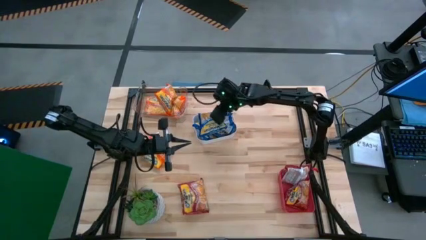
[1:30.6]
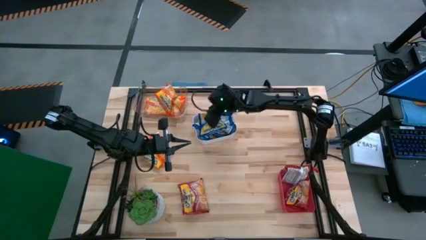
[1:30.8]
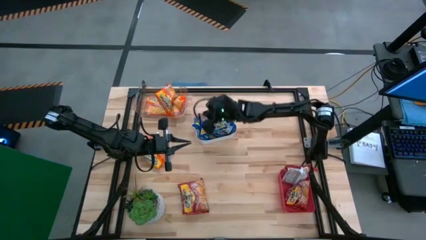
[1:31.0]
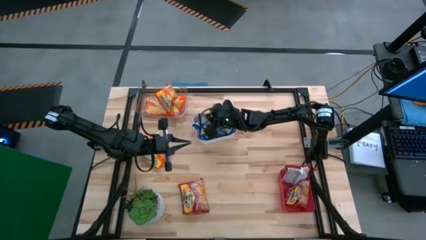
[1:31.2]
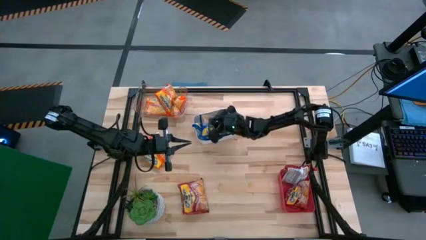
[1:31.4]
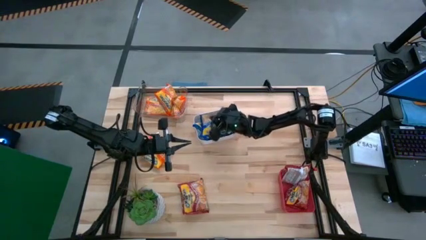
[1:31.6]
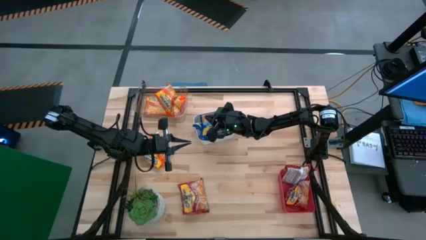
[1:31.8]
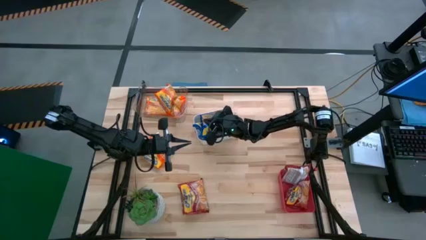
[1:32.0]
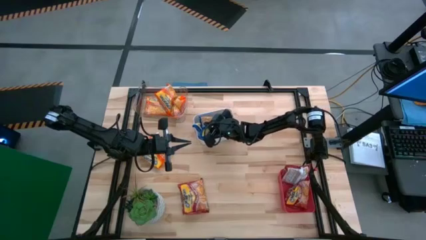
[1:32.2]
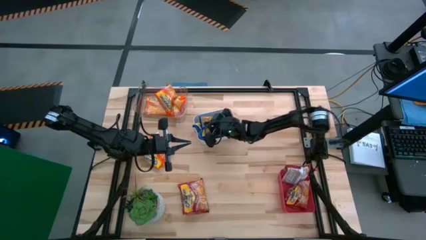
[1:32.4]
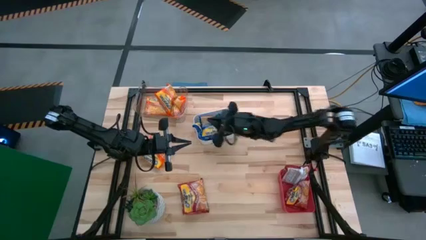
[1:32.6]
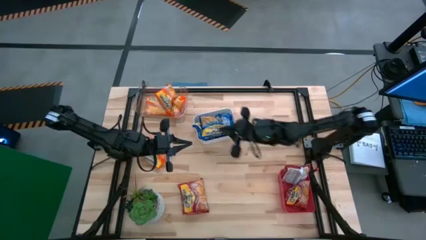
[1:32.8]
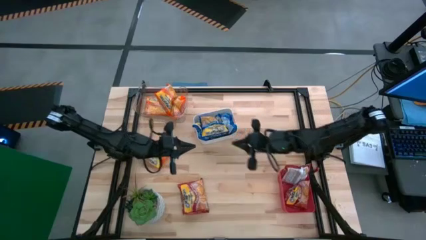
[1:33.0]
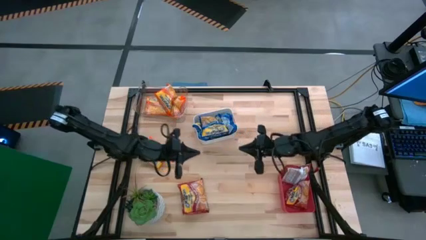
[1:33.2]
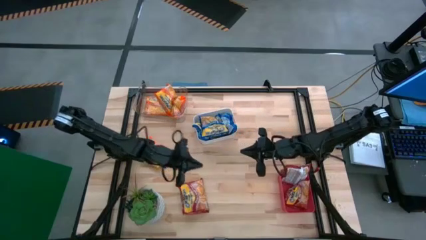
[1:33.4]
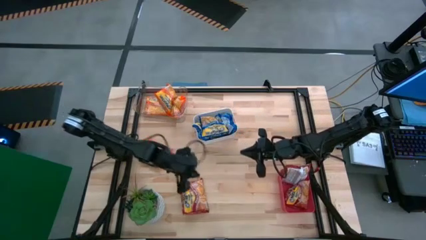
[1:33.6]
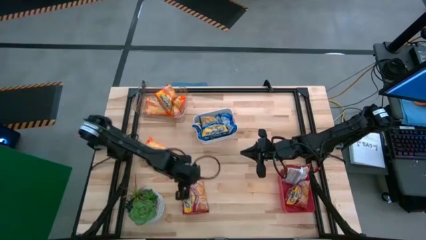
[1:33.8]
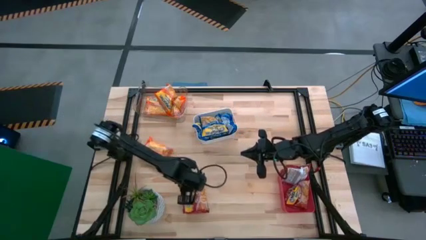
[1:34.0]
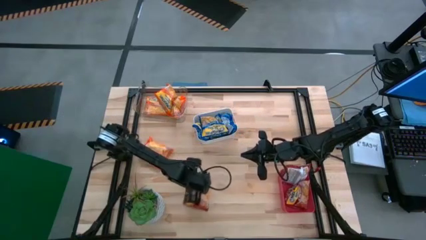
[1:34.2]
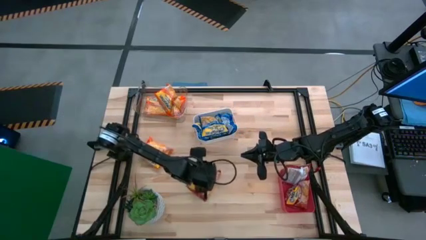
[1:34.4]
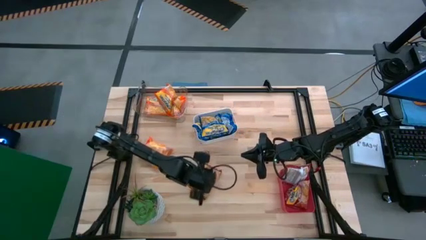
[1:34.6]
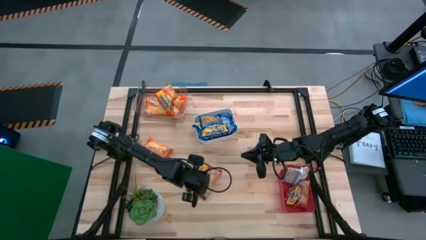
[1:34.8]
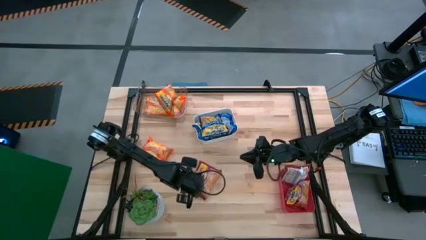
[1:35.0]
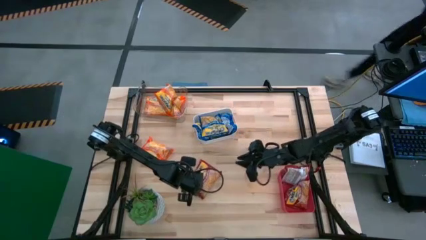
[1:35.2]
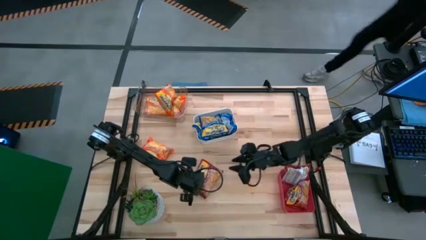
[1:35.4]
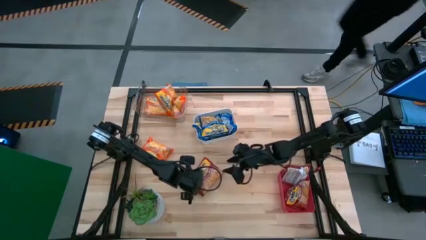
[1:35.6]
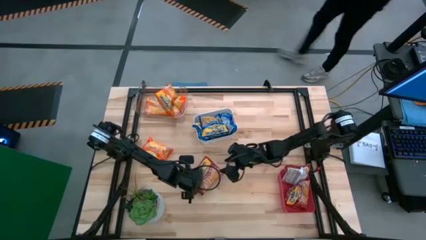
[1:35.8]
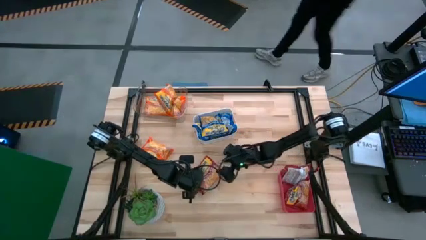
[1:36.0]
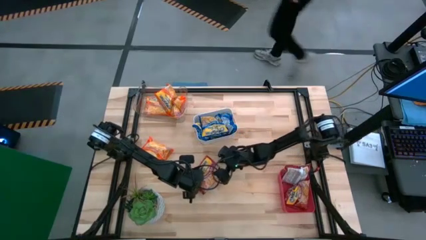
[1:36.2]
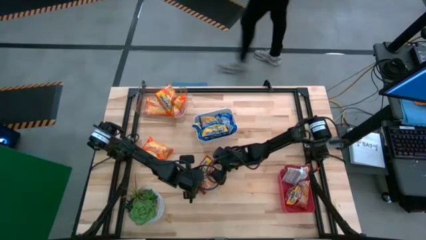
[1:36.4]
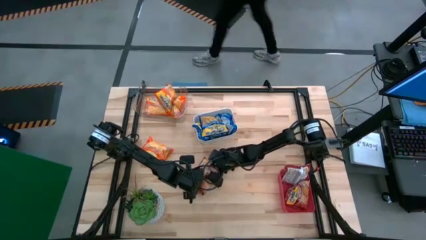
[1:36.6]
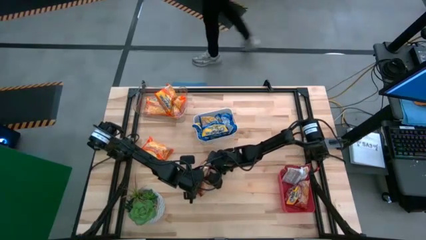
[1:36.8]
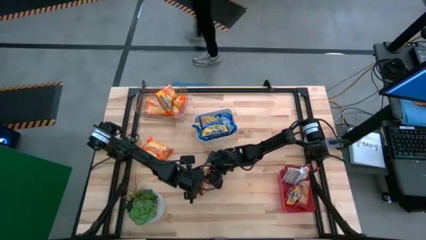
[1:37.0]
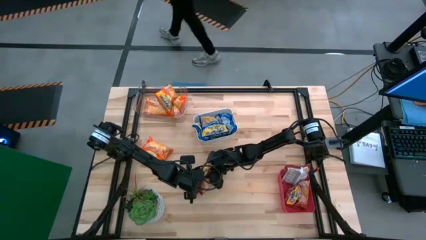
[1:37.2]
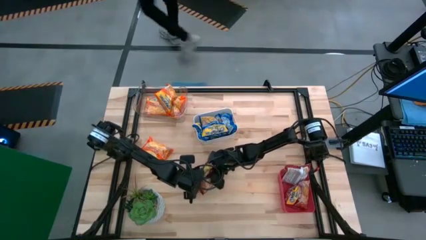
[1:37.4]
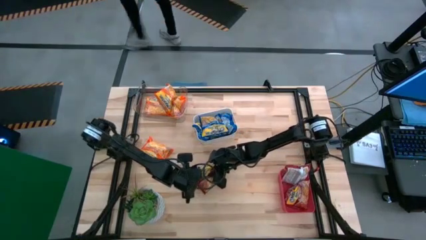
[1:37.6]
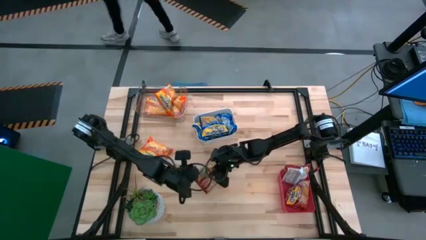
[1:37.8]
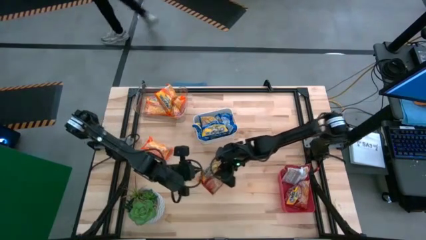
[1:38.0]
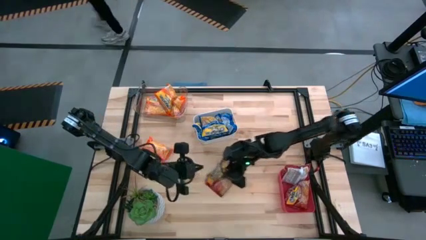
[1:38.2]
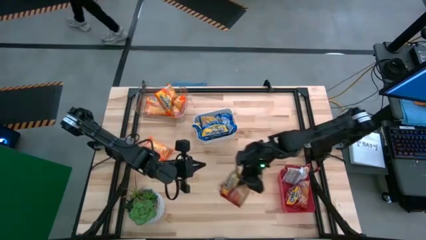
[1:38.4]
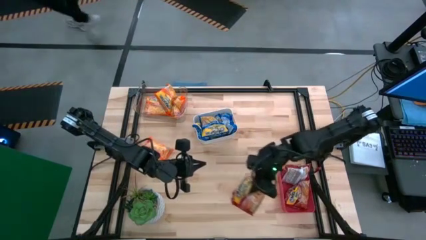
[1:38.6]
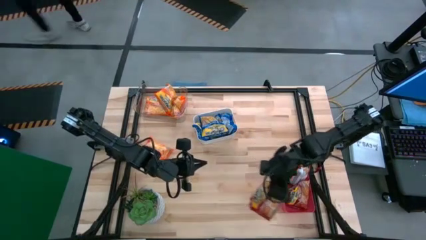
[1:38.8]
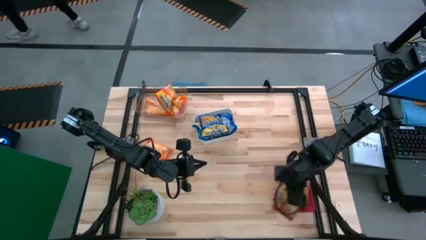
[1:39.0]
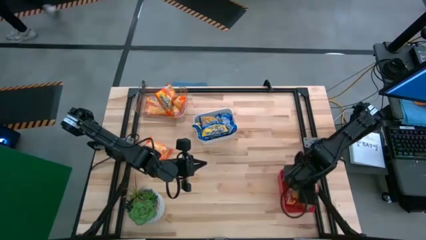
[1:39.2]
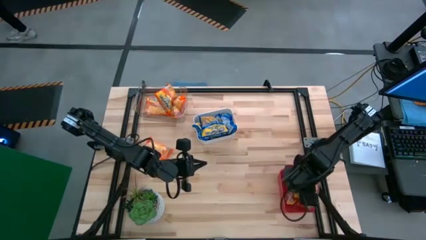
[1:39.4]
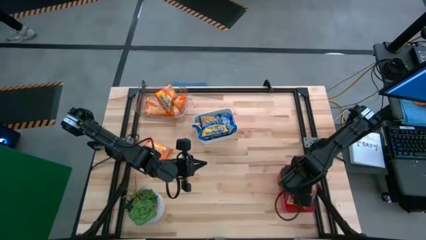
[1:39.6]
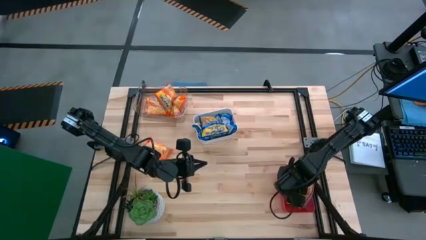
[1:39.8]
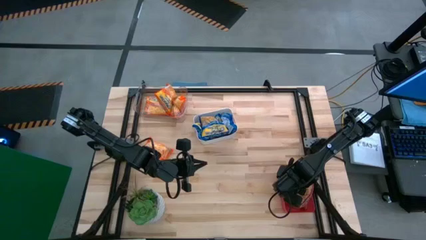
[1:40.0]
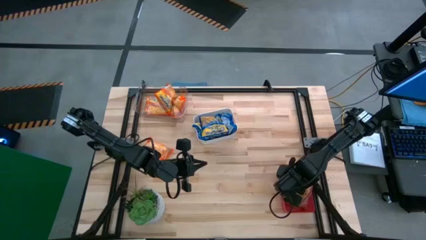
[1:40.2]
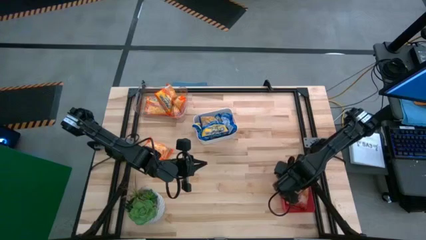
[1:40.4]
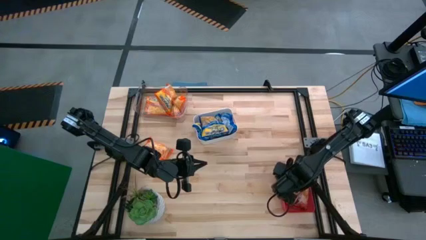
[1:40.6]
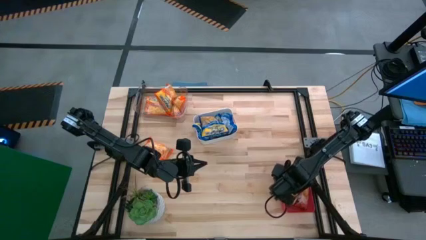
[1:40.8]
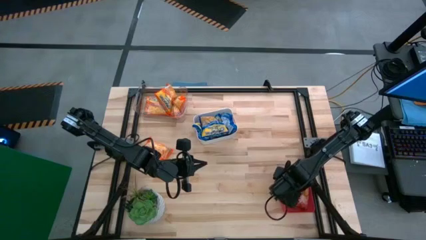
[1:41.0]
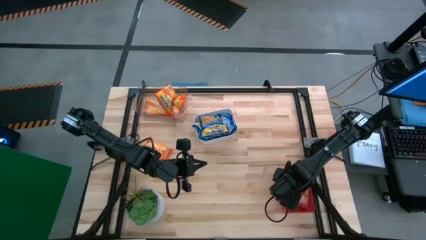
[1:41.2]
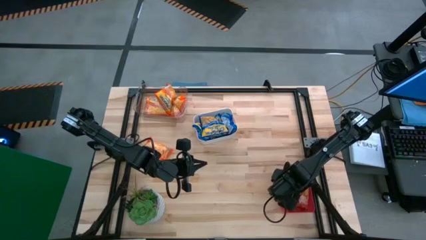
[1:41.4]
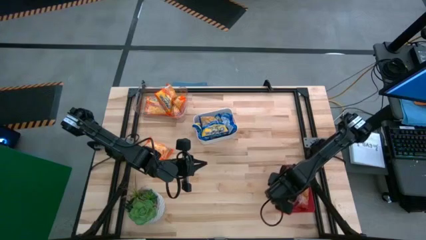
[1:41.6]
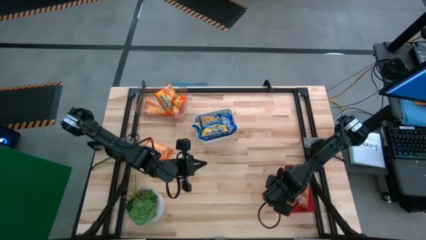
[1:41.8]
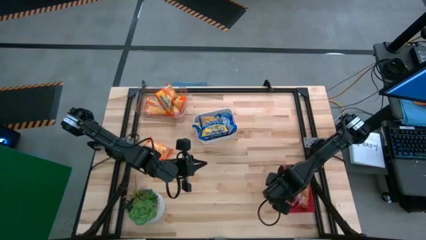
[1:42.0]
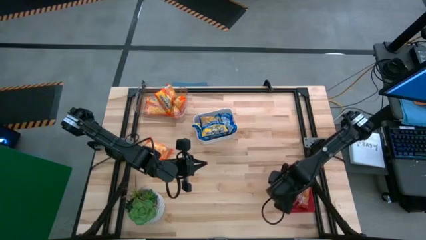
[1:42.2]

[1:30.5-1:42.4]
Task: Sort Maruchan noodles
Put the red noodle pack into the pink bin

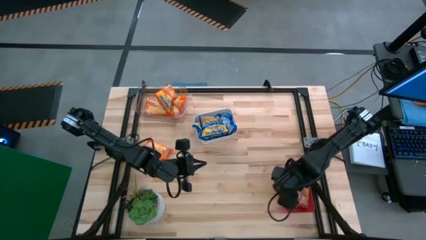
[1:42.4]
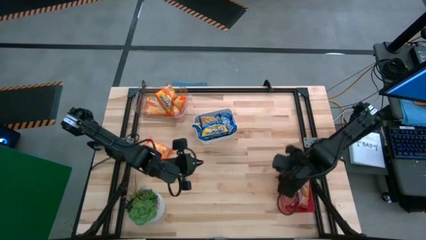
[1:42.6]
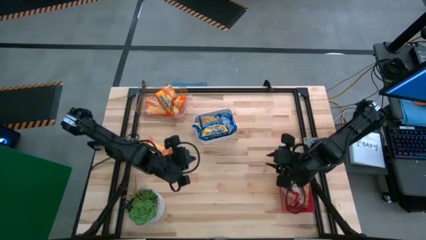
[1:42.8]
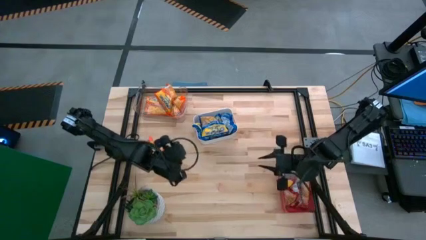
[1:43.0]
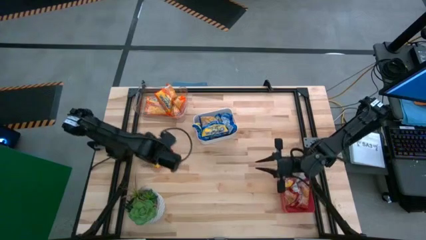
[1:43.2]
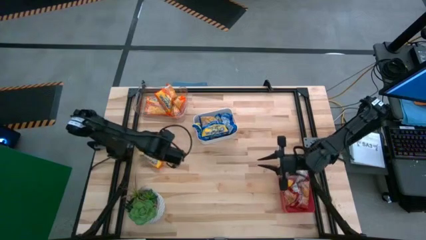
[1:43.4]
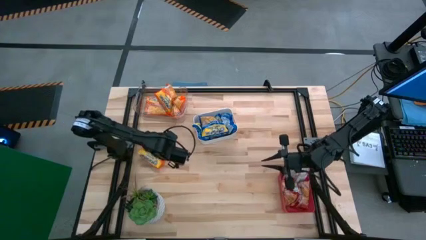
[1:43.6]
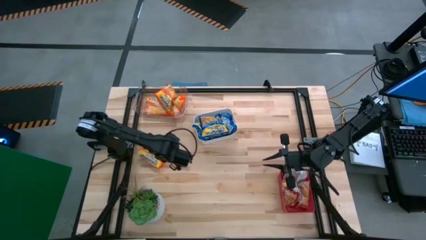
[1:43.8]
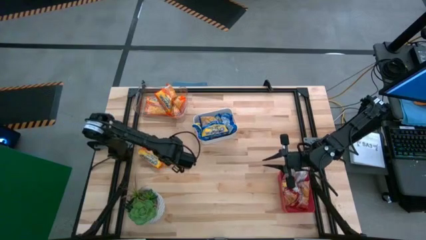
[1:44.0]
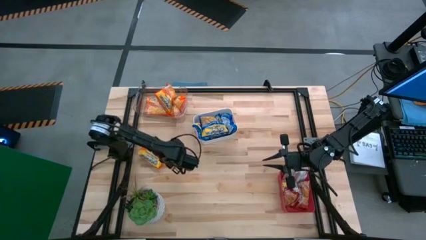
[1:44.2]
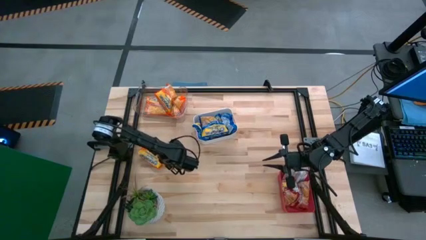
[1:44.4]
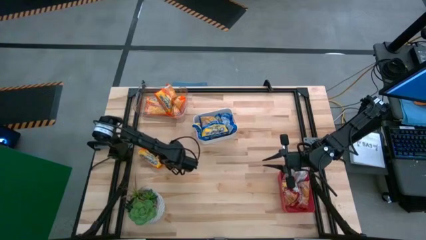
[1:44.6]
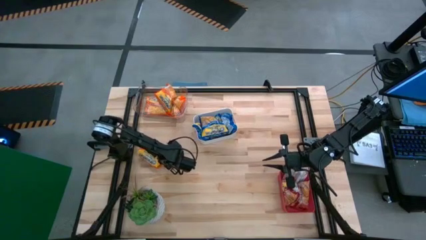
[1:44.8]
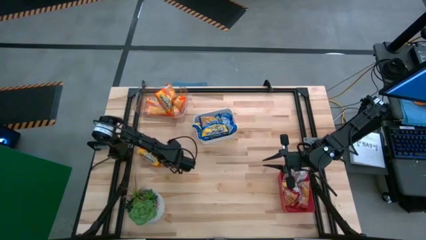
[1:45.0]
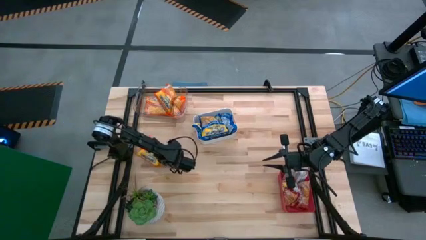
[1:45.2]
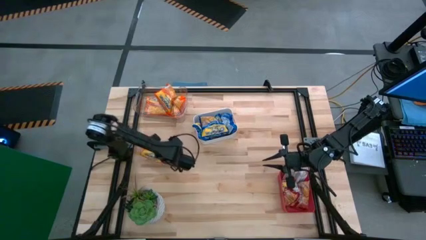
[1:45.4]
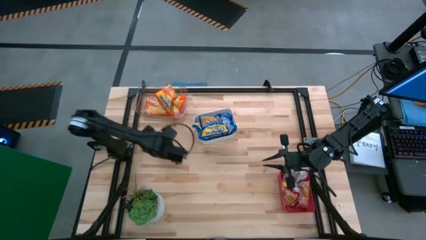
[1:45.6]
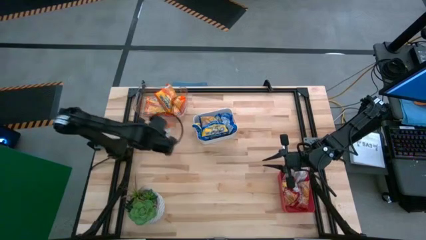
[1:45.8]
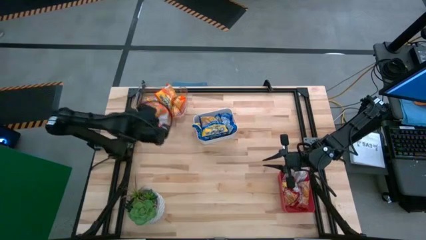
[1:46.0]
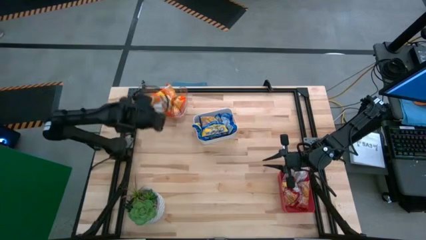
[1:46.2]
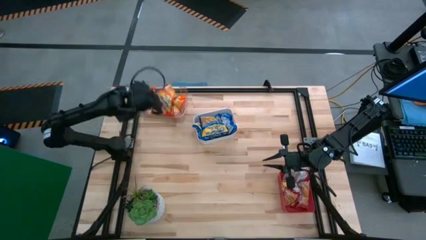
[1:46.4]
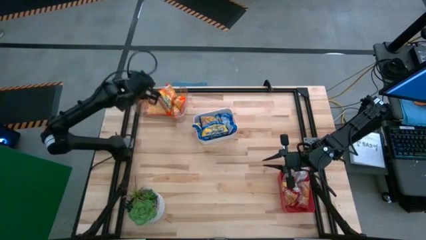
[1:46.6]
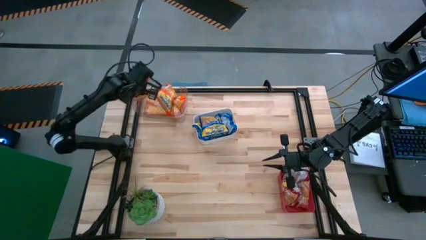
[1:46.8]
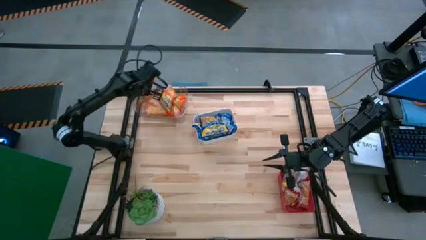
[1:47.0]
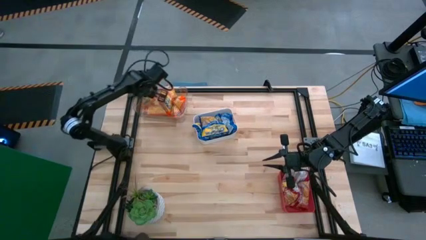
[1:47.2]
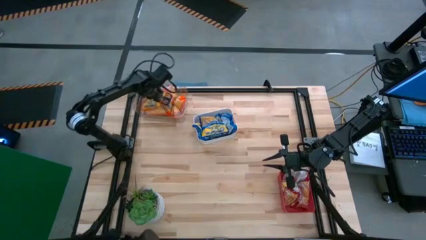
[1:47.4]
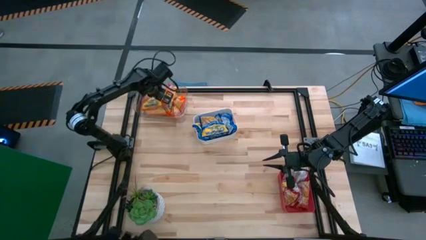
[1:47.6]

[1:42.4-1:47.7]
Put the orange noodle pack into the transparent bin
